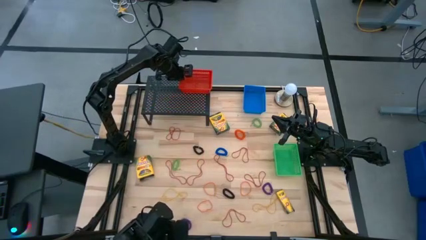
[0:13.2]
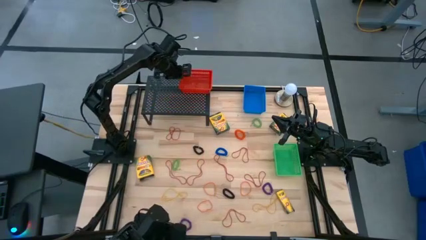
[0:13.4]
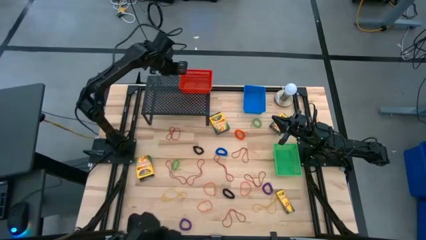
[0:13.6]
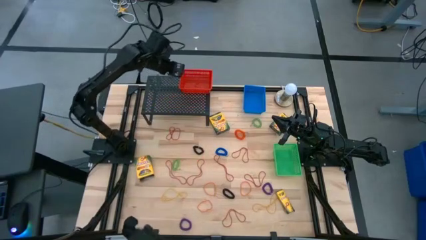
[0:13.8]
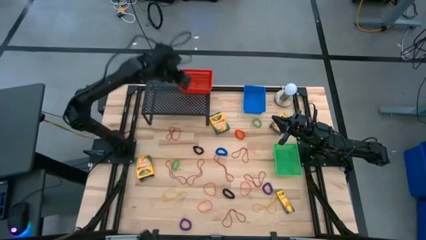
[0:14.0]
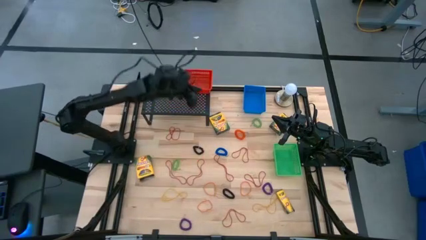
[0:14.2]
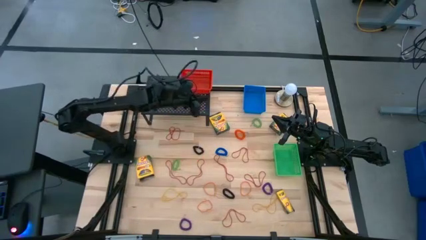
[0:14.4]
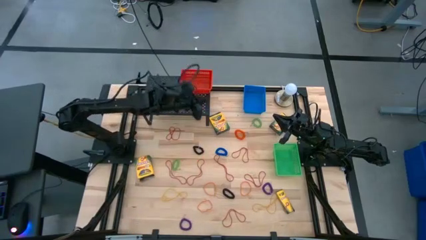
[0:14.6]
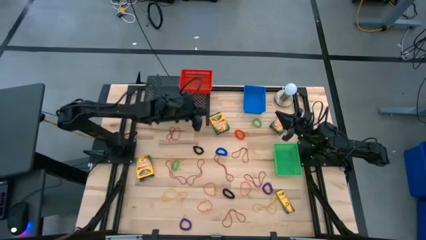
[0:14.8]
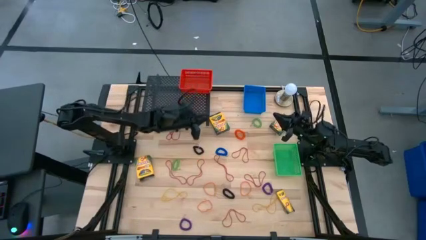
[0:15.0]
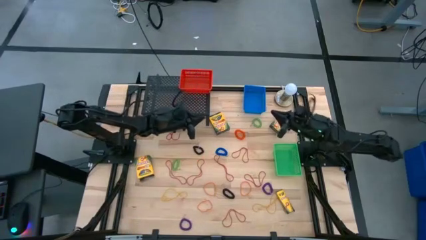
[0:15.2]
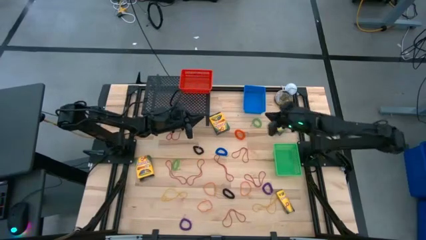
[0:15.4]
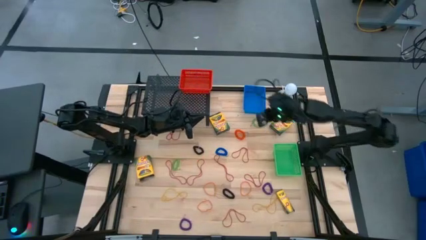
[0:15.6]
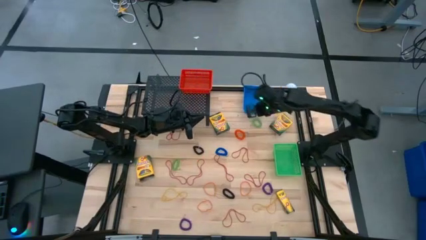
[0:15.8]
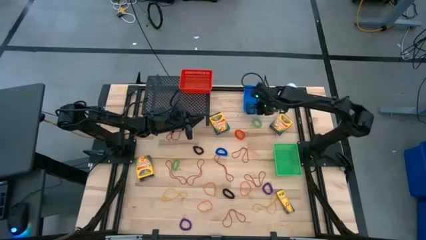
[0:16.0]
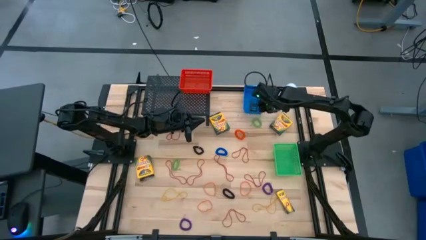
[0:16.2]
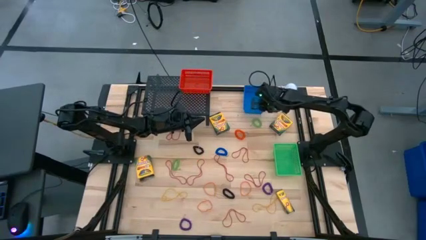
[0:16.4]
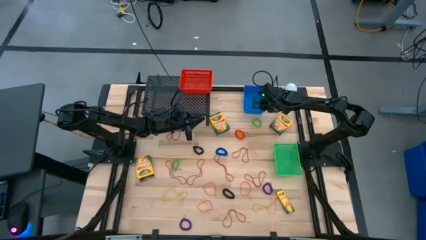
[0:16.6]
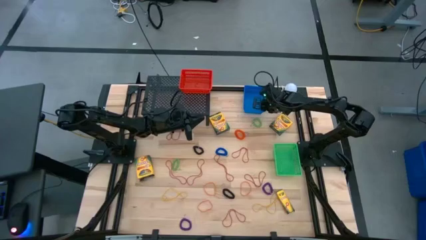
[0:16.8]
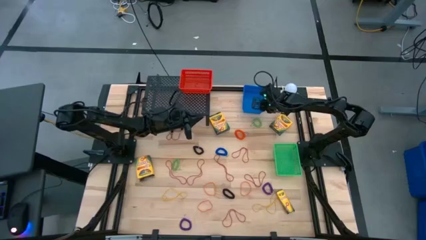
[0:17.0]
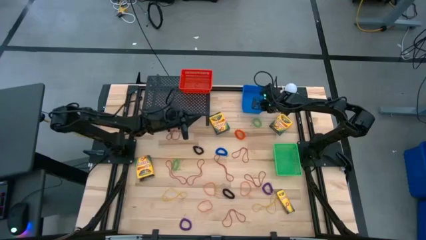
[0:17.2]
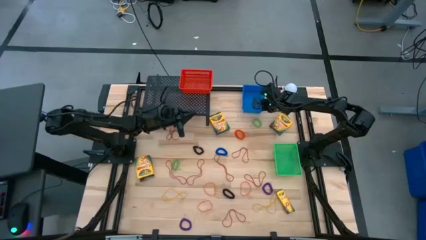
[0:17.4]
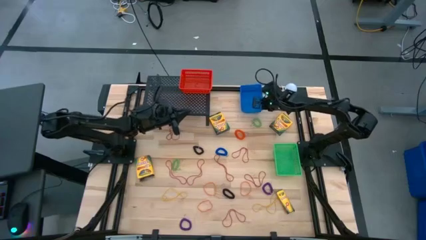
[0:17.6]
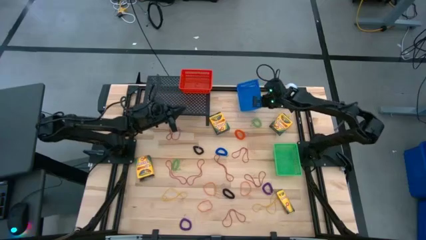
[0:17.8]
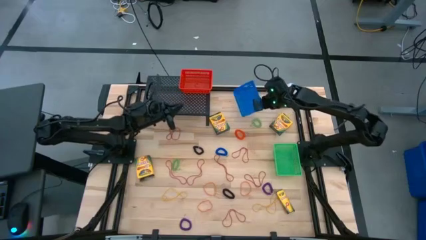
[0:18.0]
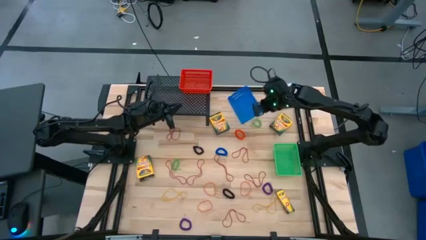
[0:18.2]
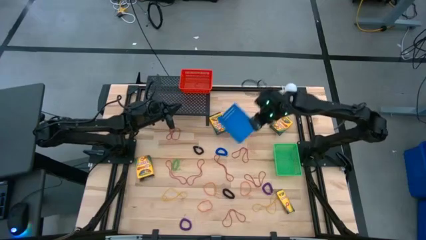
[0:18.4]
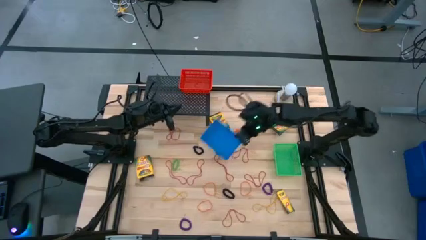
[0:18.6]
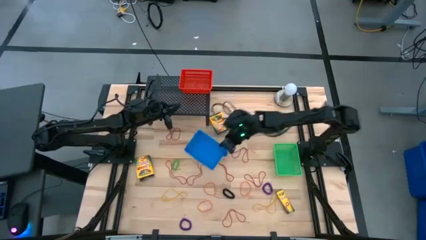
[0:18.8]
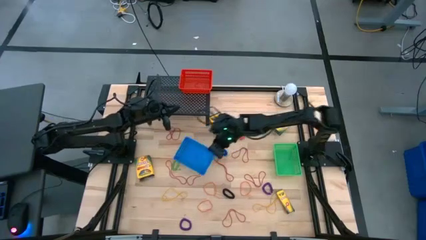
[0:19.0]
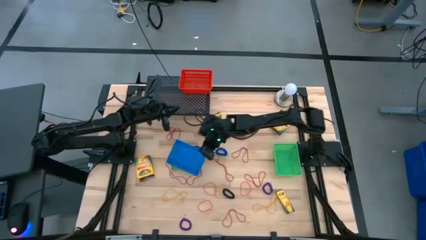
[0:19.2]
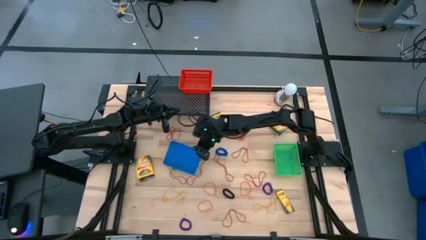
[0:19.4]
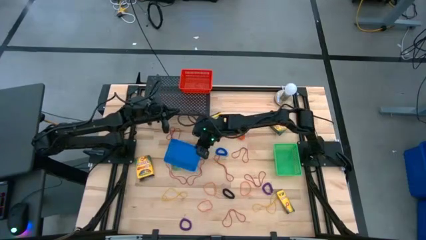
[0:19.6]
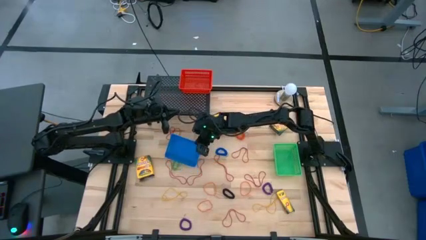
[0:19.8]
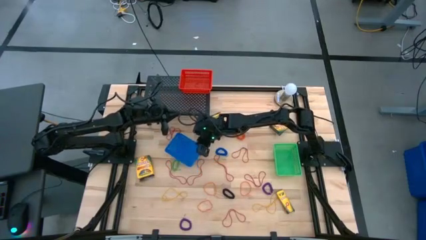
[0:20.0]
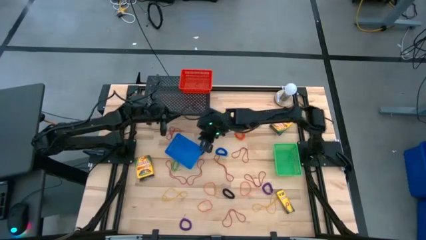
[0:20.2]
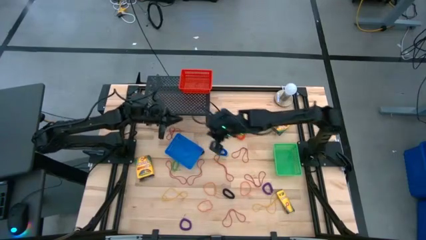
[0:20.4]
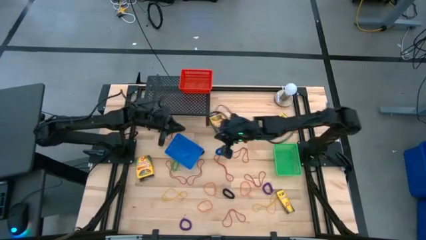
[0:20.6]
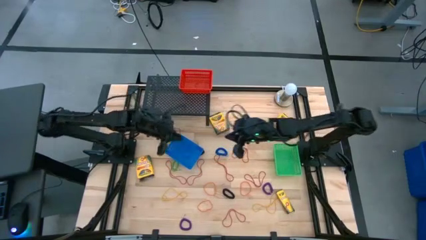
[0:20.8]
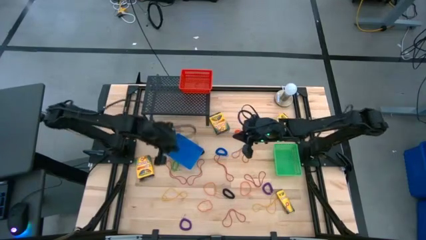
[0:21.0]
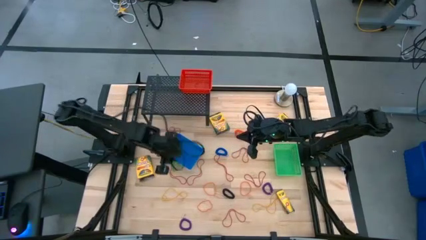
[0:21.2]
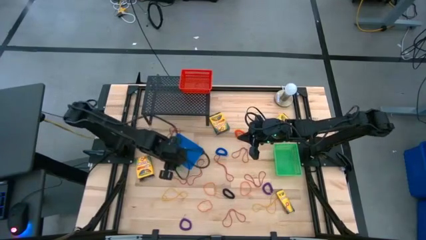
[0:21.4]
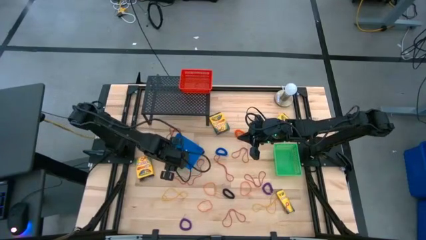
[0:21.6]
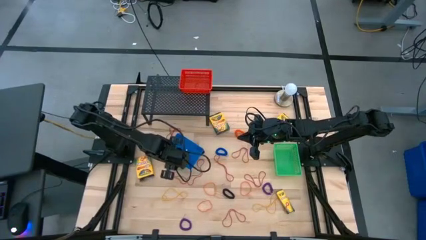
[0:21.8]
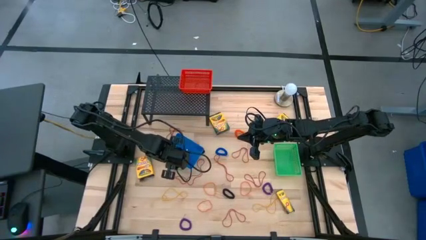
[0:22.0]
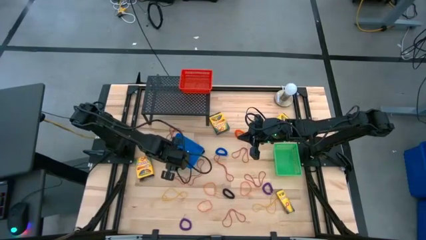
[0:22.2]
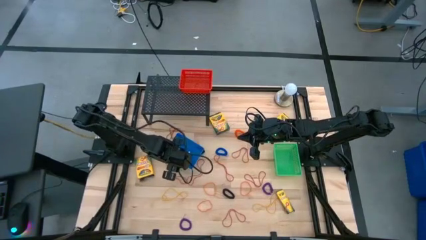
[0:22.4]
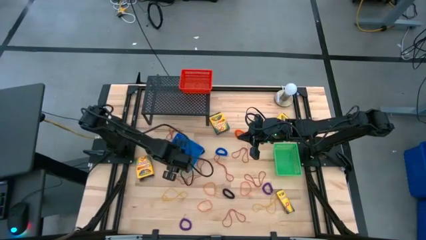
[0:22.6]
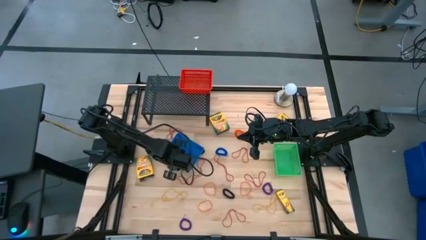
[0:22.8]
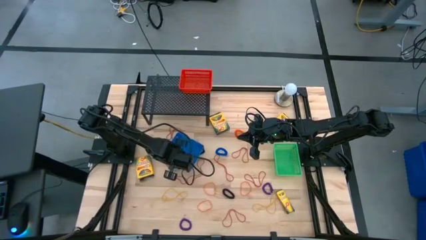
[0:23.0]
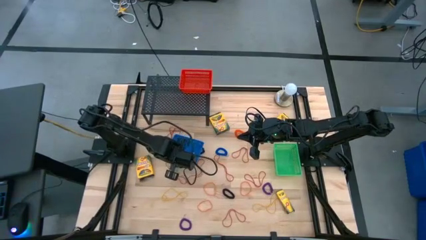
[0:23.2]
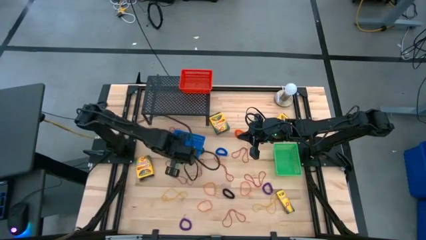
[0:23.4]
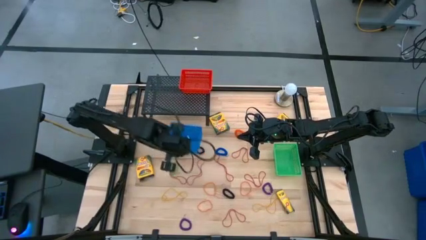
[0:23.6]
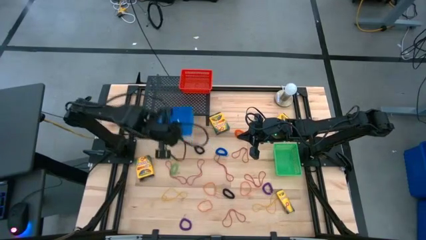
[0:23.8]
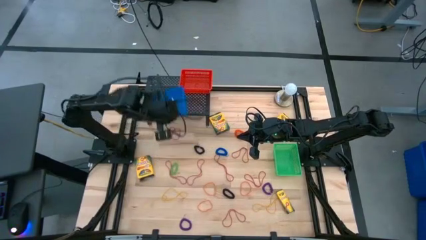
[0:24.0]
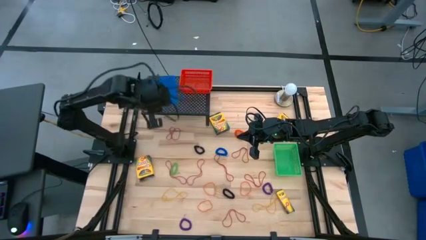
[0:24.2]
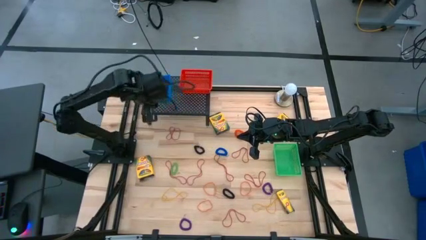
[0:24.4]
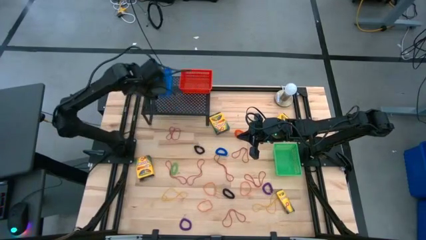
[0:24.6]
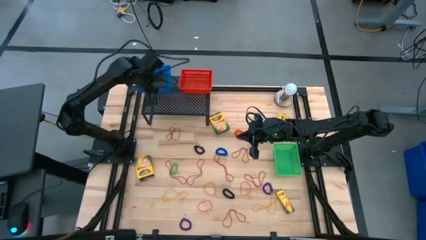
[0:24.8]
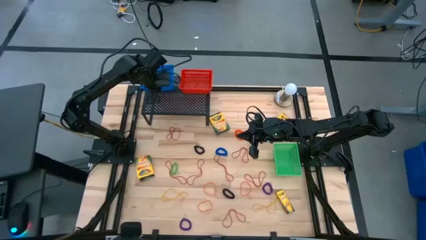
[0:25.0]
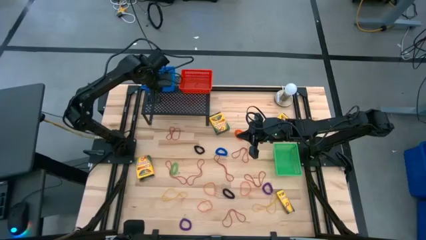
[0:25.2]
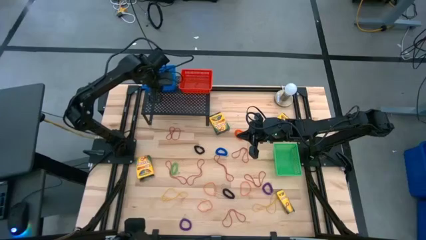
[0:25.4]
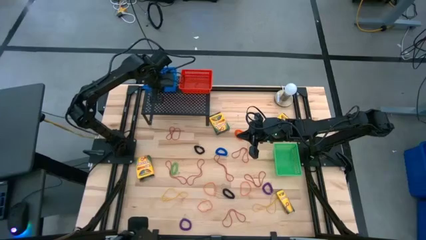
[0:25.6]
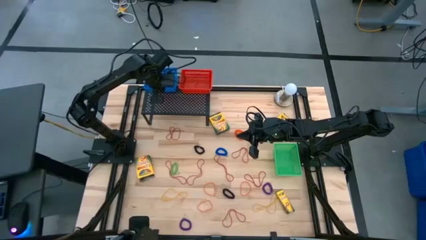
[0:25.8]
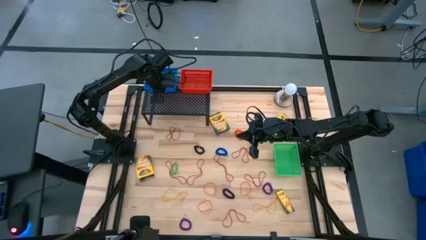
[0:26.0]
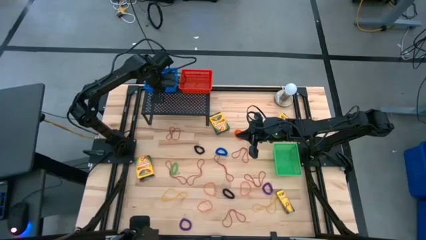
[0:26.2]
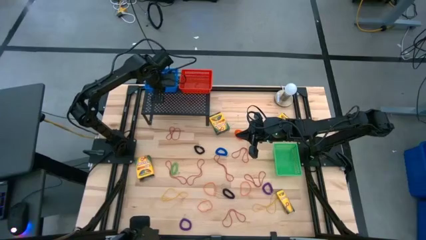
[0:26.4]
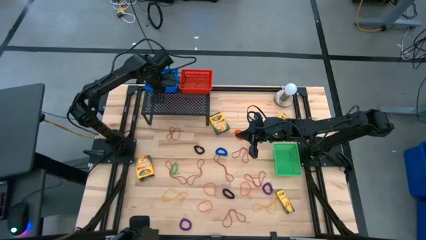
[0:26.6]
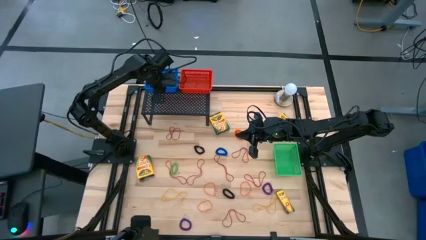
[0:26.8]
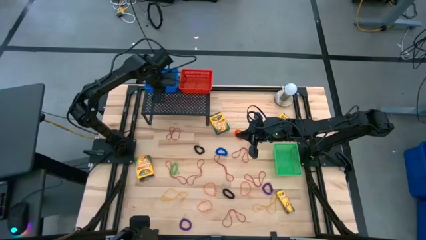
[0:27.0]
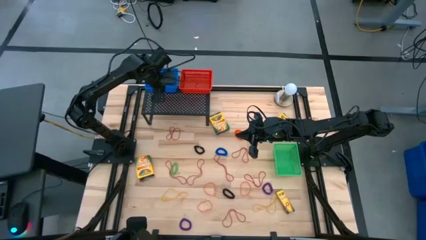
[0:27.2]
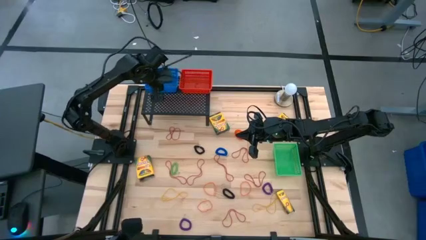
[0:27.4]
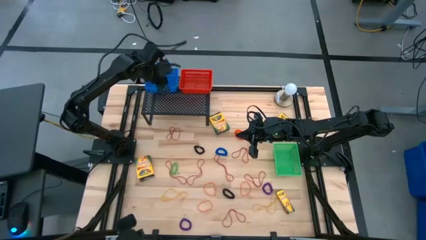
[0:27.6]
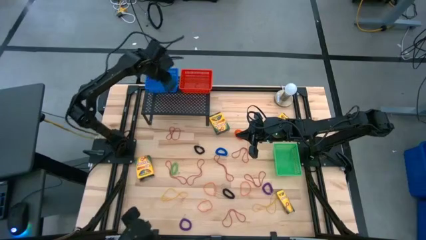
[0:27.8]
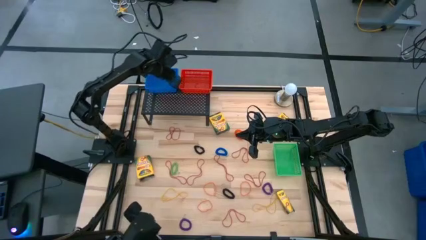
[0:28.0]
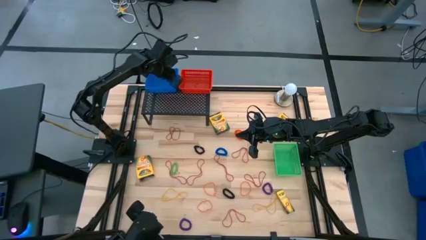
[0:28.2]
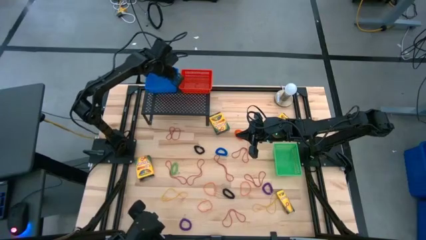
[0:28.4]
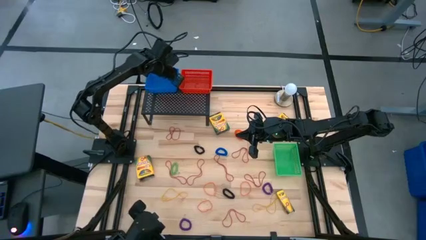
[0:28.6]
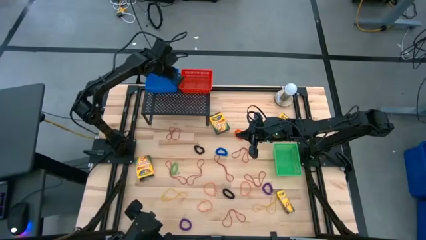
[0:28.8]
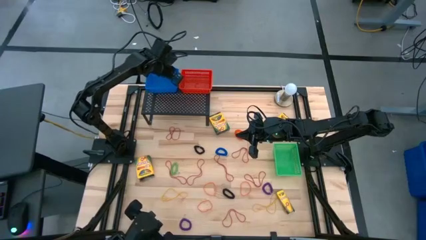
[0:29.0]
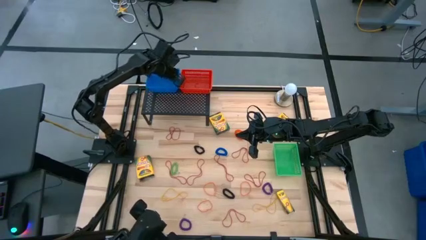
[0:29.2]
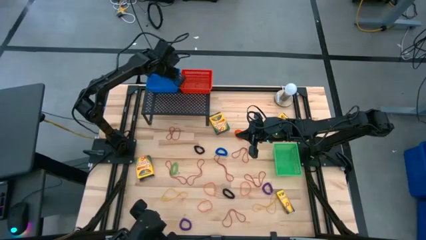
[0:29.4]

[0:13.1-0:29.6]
Task: Pick & Place Office Desk Supplies
Put the blue bin on the shelf
